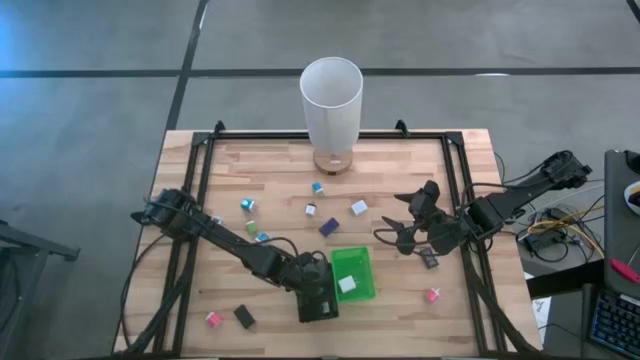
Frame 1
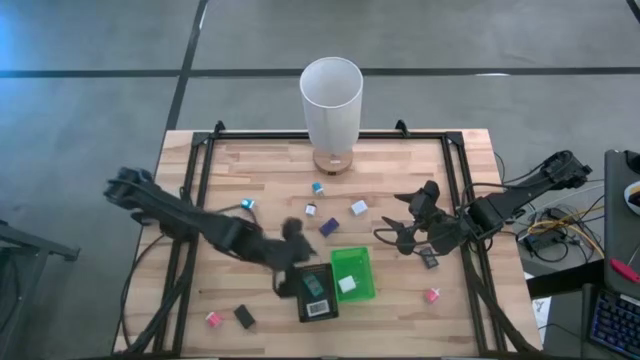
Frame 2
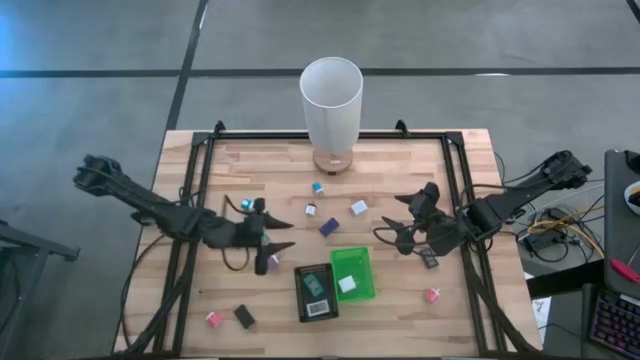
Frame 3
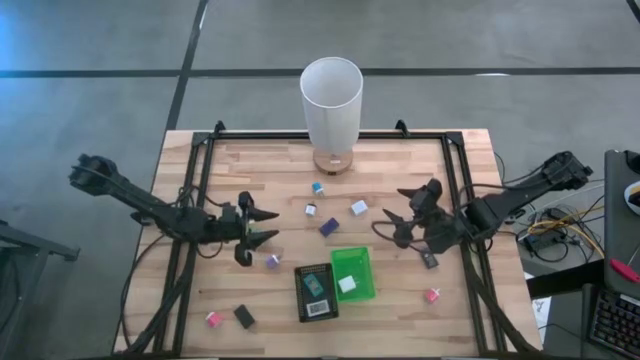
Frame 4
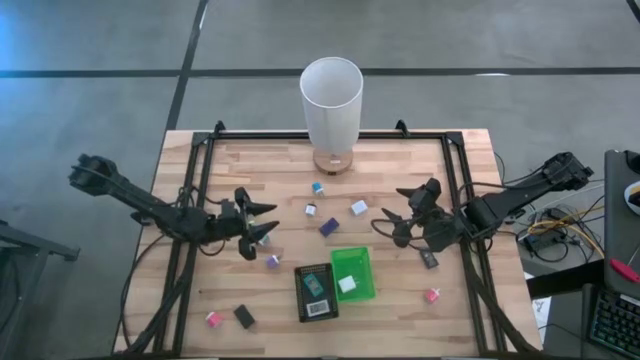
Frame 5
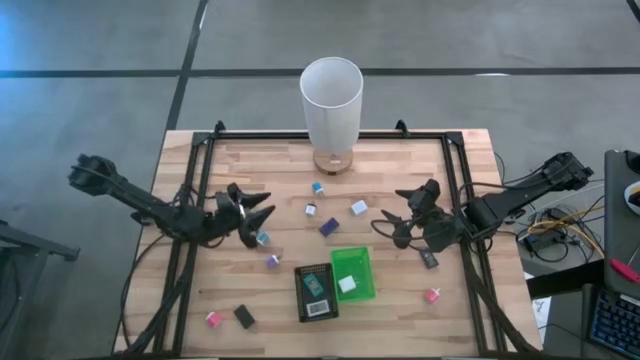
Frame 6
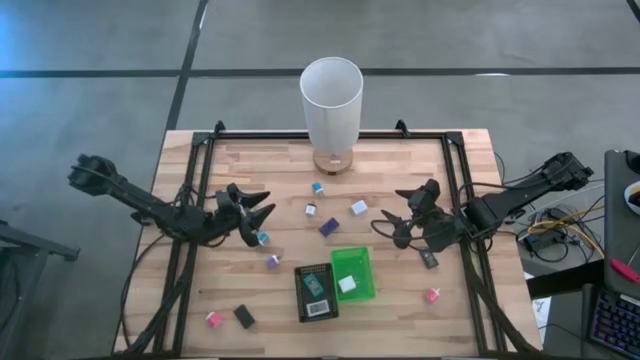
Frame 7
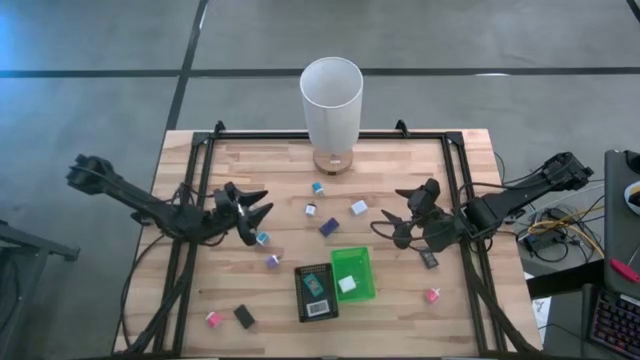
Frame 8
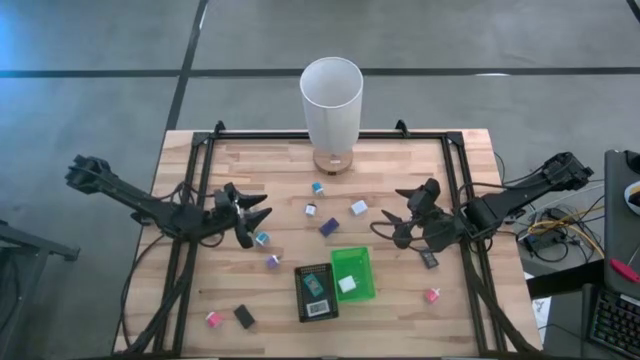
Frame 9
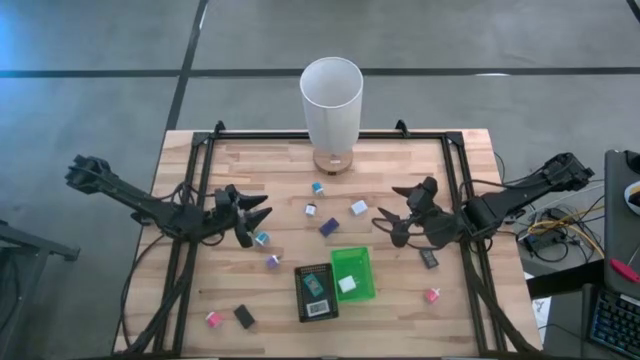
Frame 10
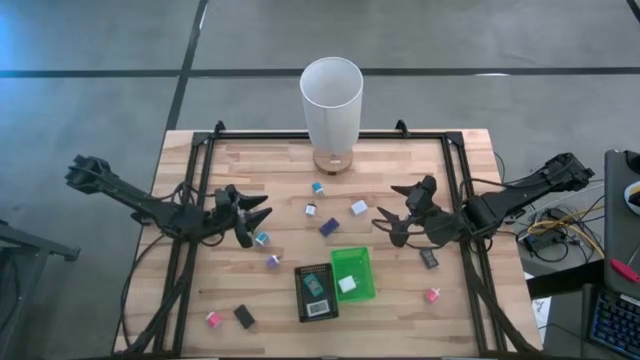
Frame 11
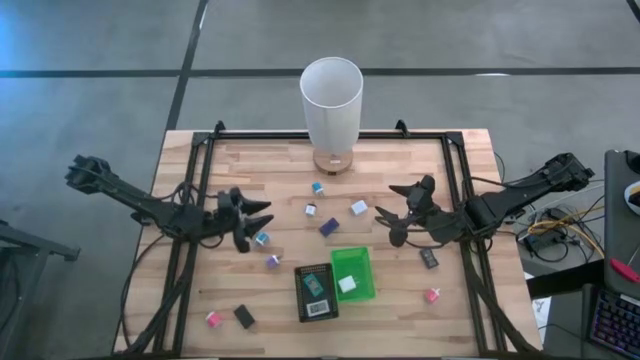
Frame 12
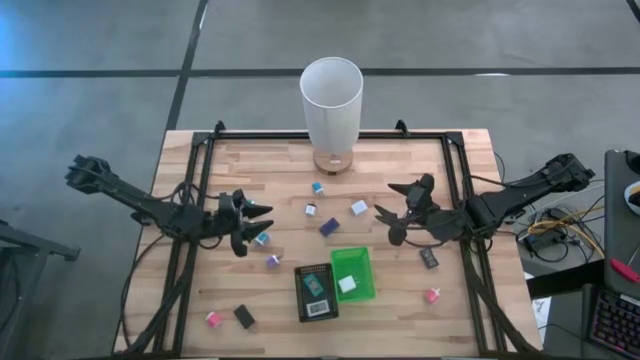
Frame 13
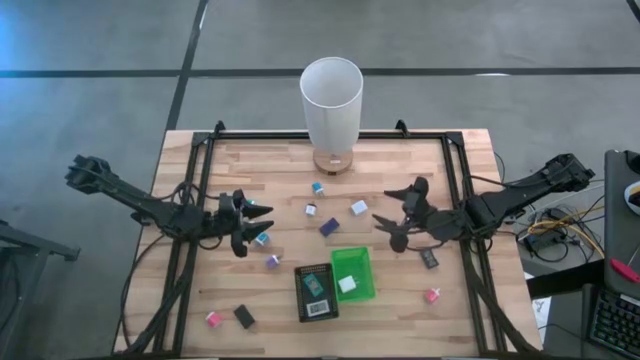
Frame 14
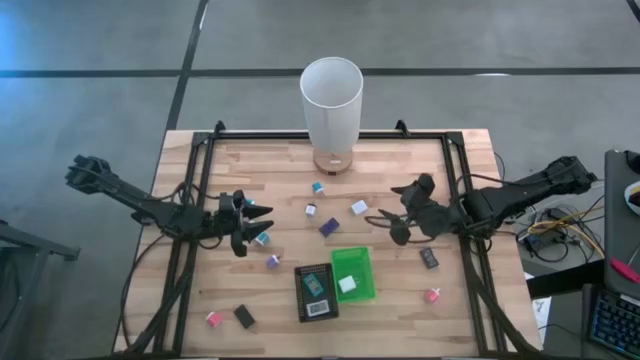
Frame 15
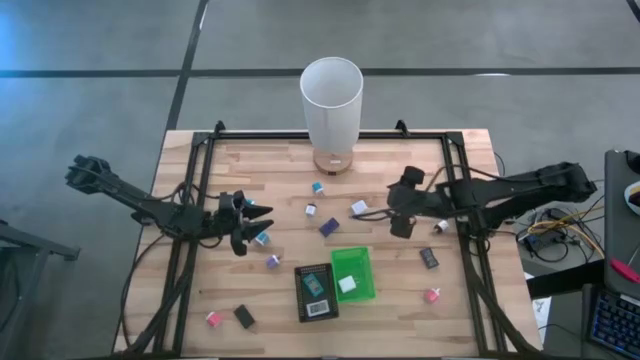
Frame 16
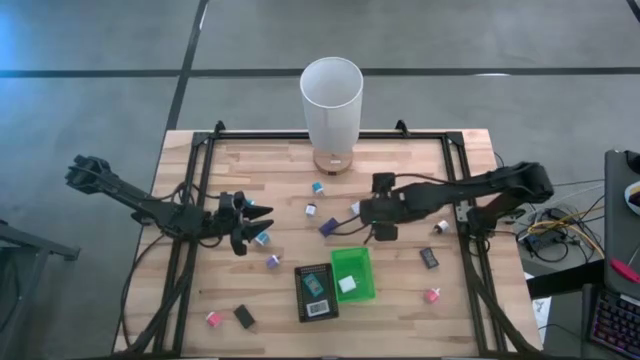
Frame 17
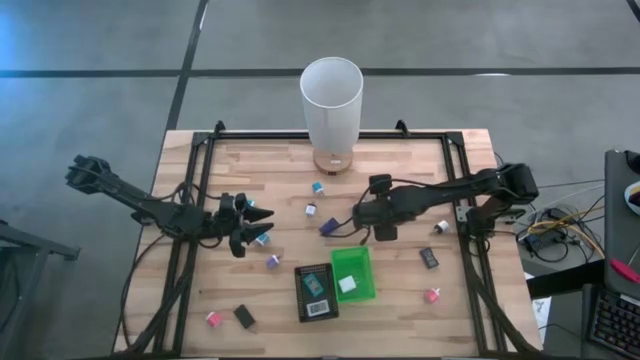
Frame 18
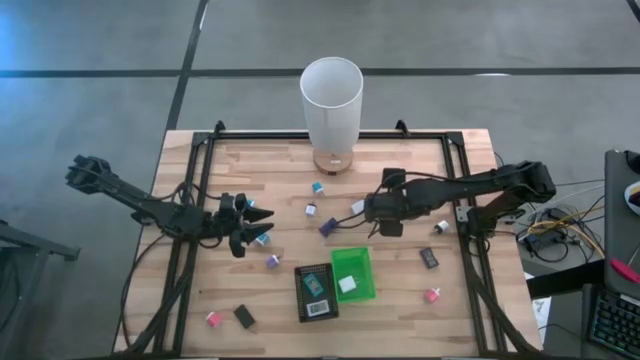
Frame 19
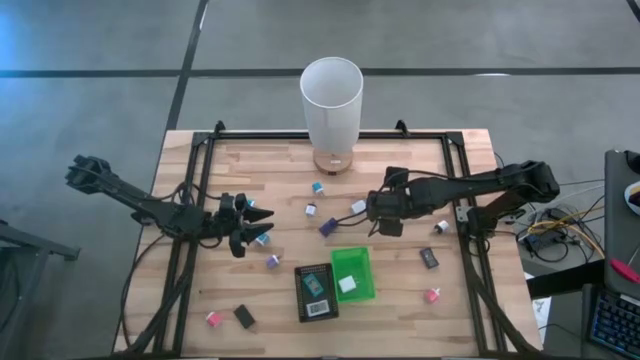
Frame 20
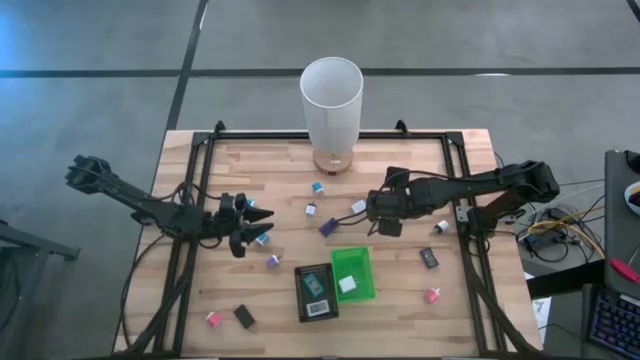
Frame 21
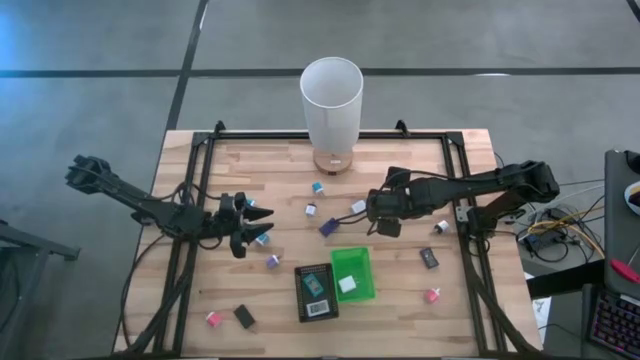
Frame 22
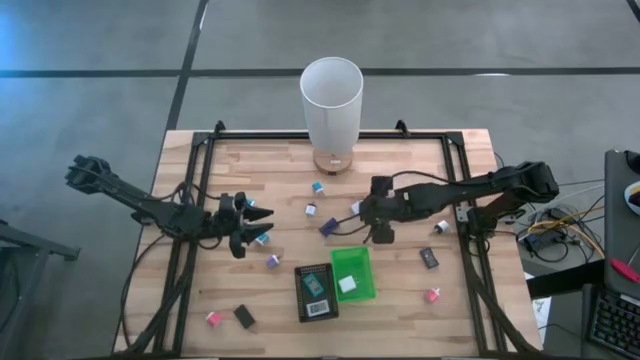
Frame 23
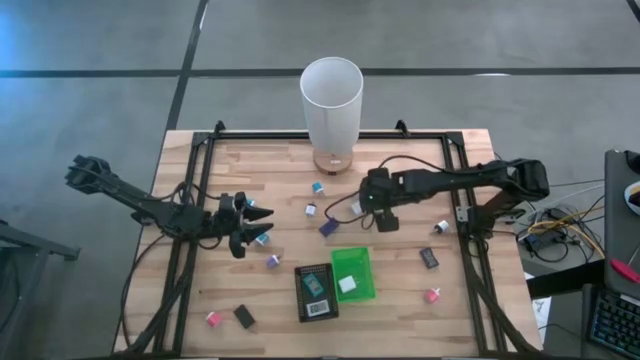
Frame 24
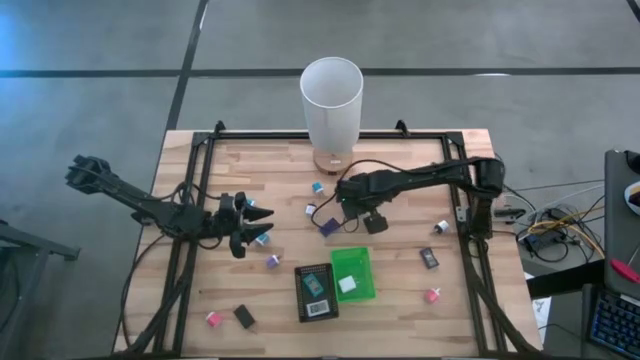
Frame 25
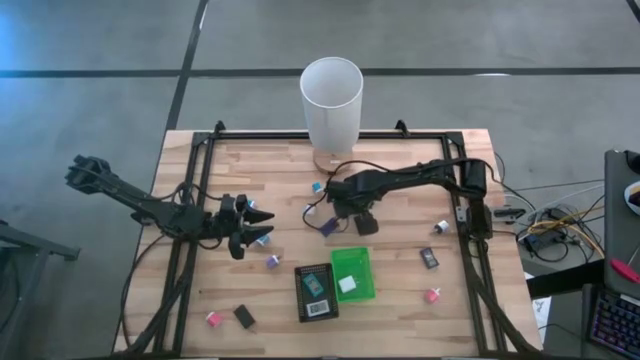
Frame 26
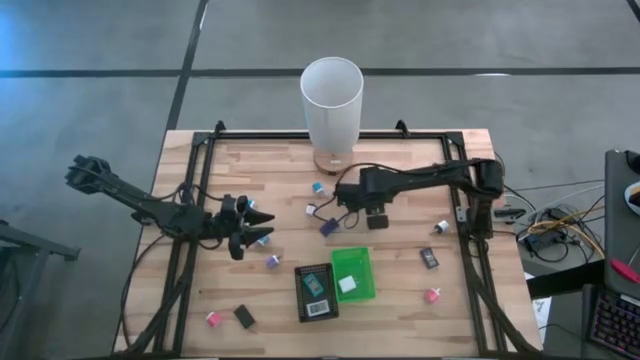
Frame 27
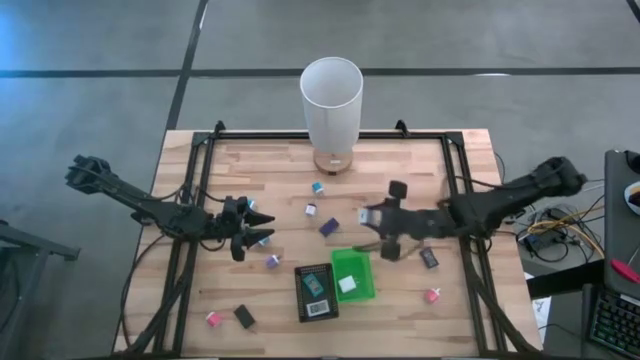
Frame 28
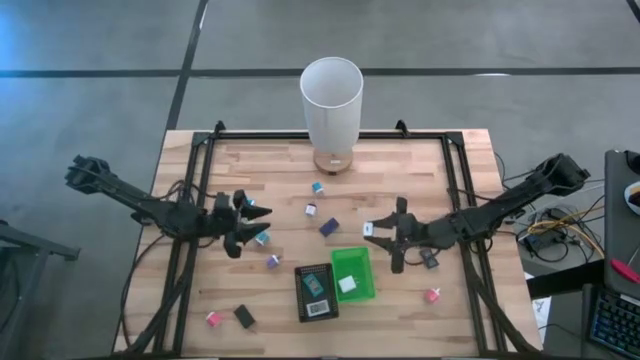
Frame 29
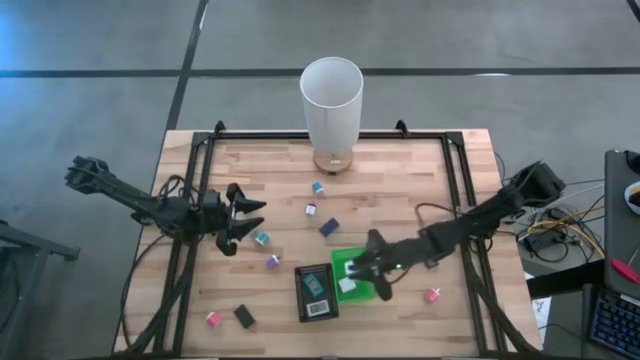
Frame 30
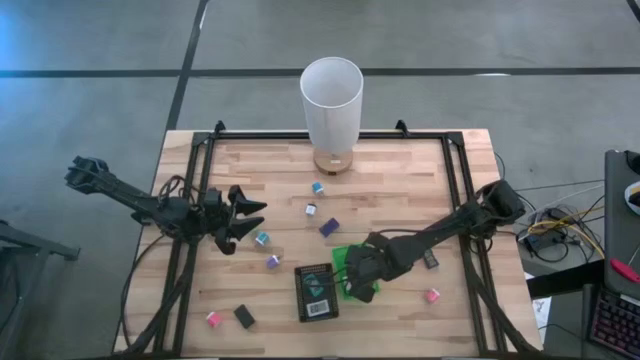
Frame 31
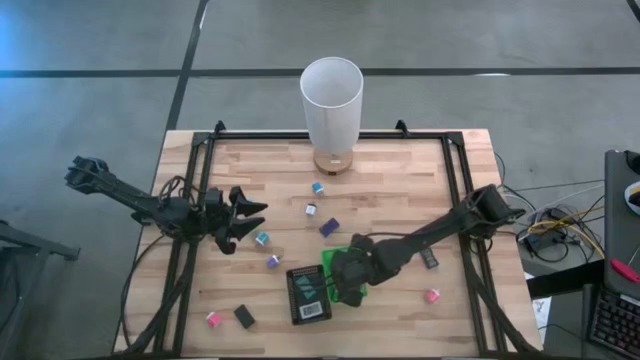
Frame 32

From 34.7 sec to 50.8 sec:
Task: Pick & Place Office items
Put the white charger adapter into the green bin

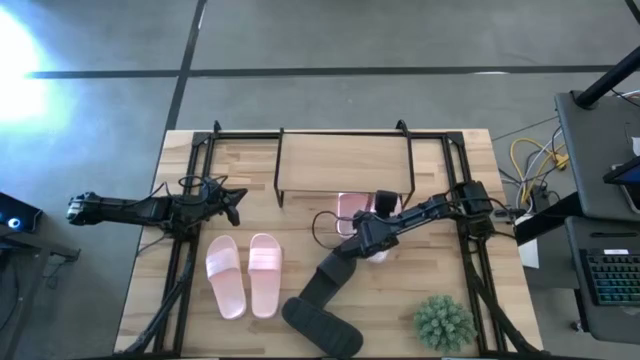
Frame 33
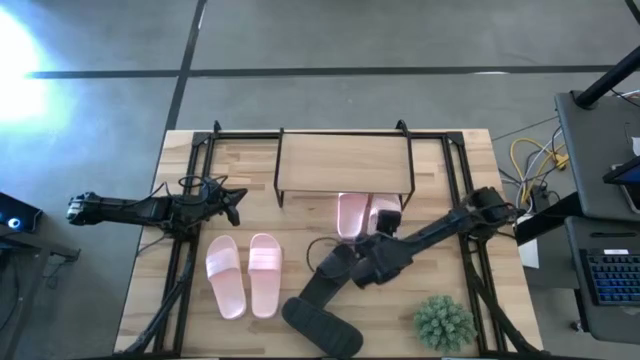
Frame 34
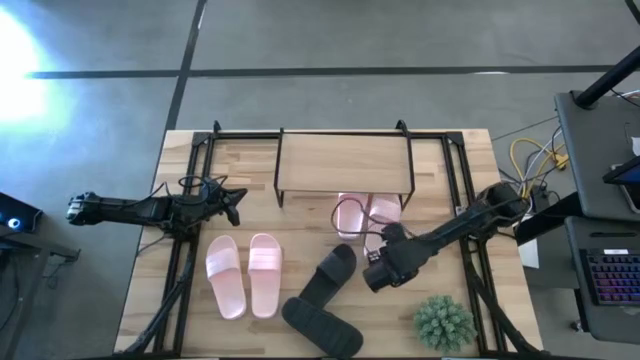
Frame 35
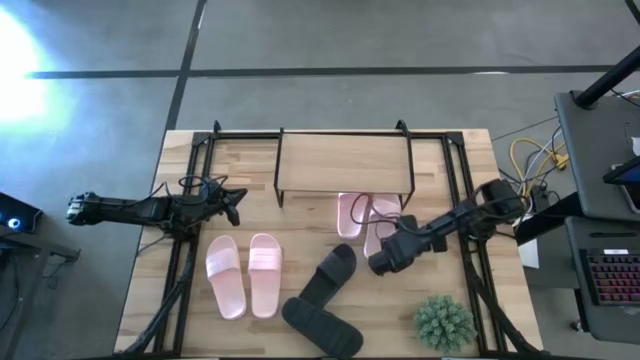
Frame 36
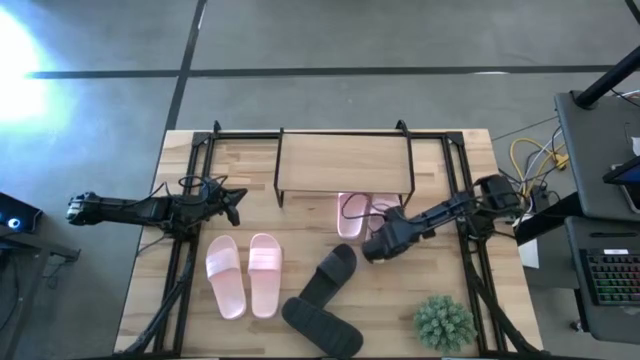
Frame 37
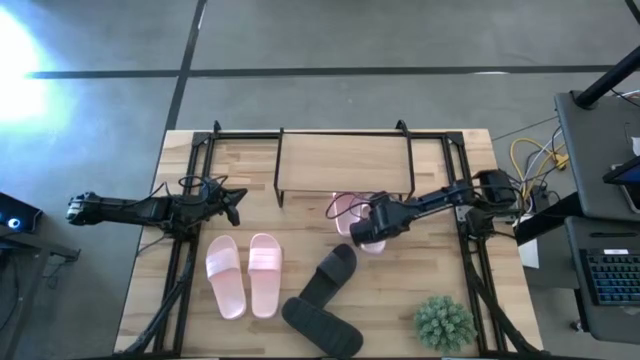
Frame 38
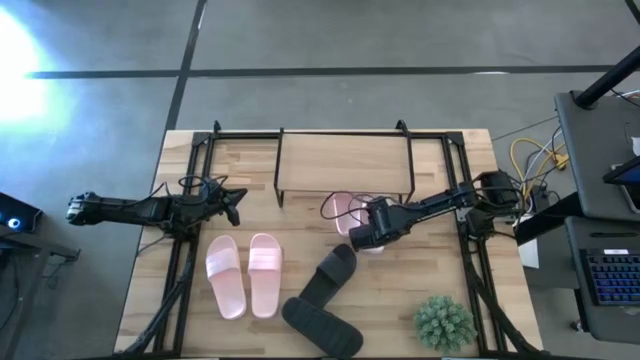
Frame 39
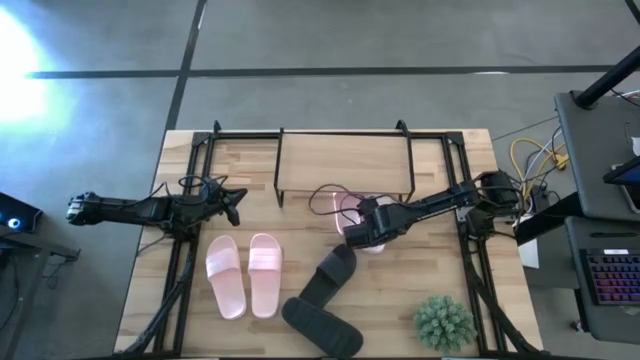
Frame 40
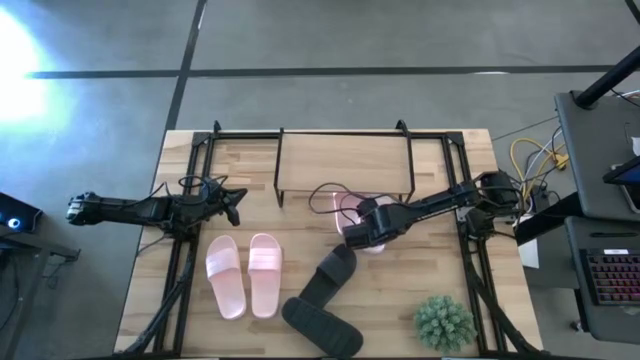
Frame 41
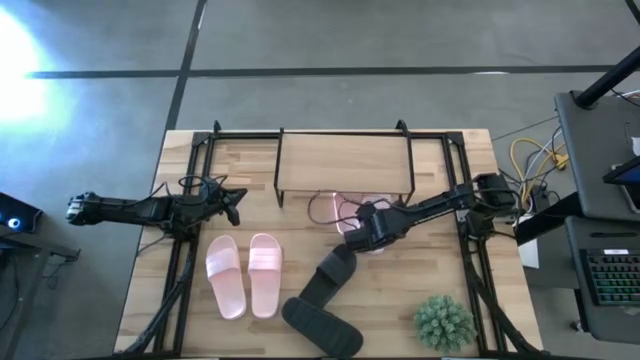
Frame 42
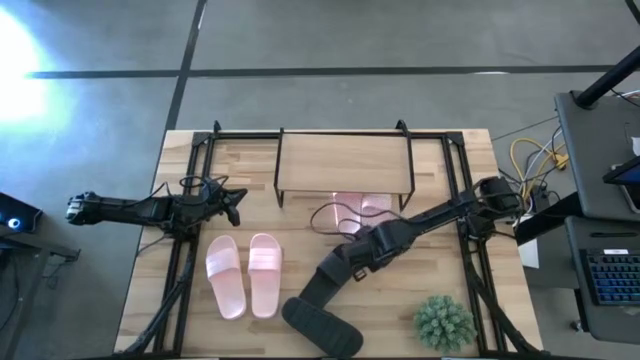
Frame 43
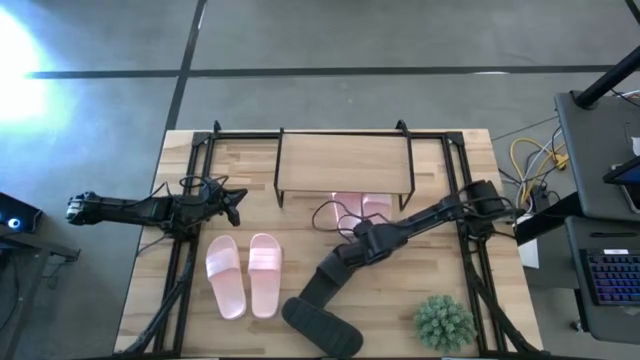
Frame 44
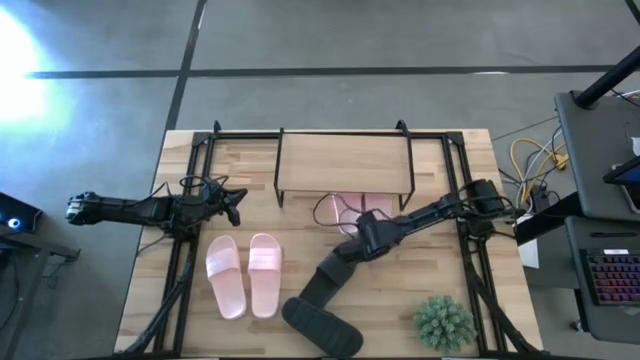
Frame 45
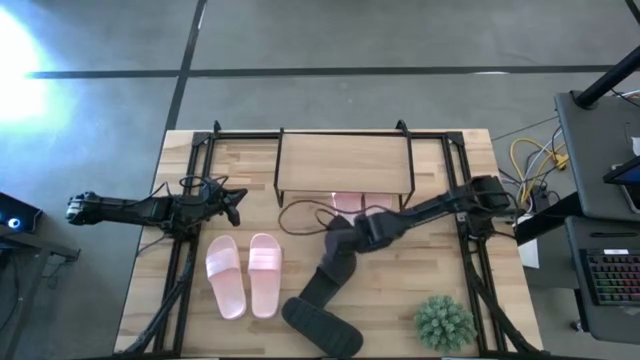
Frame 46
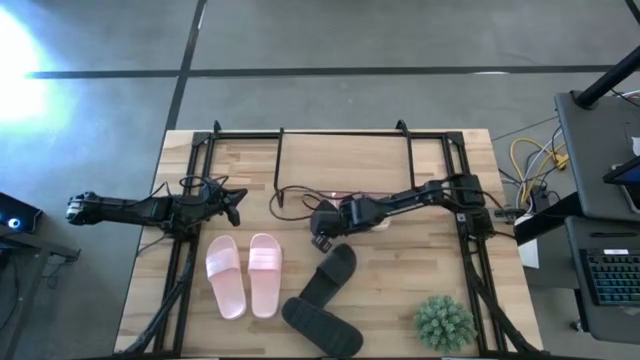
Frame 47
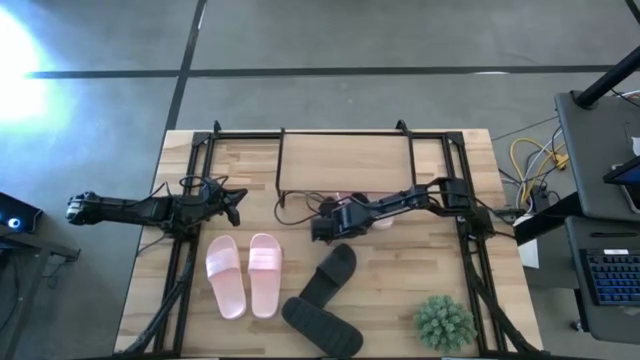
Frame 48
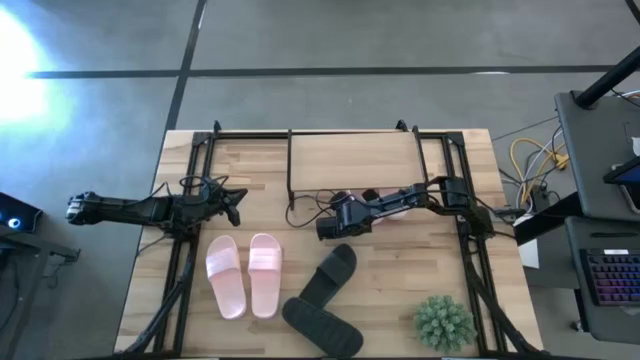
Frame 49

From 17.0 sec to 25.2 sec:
Task: Pick and place slides into the shelf
Adjust the pink slides under the shelf
